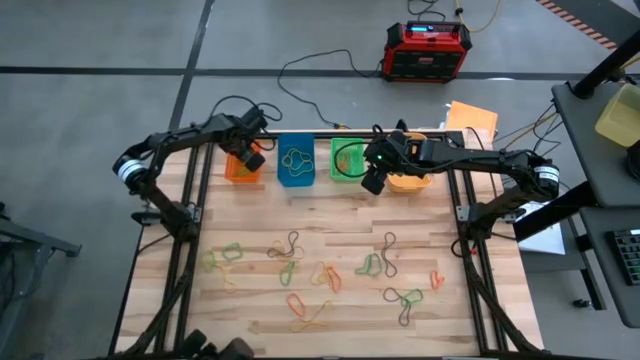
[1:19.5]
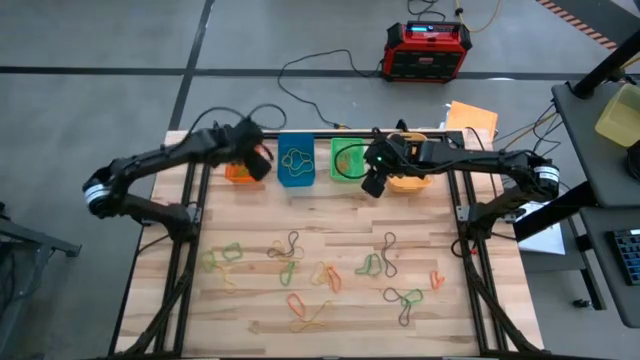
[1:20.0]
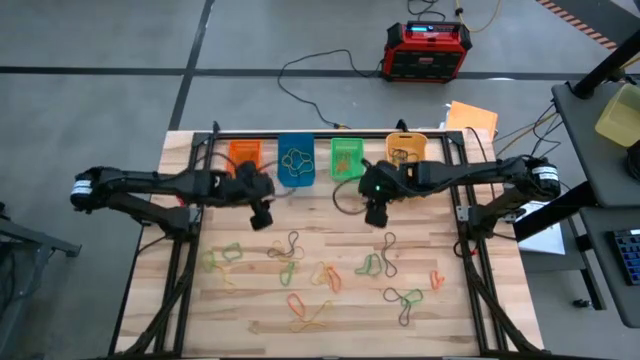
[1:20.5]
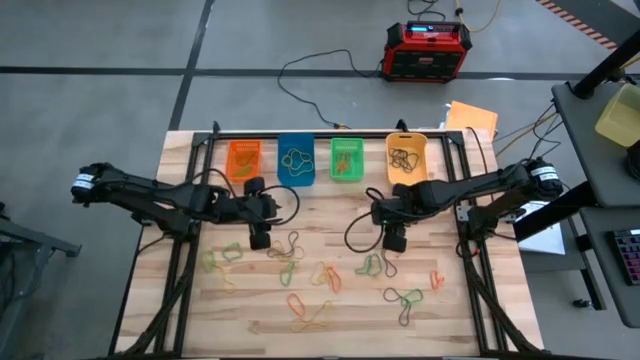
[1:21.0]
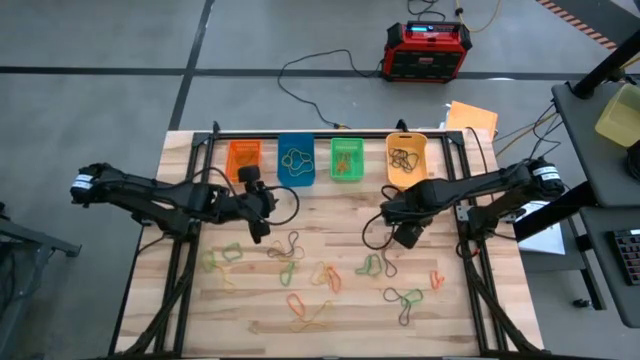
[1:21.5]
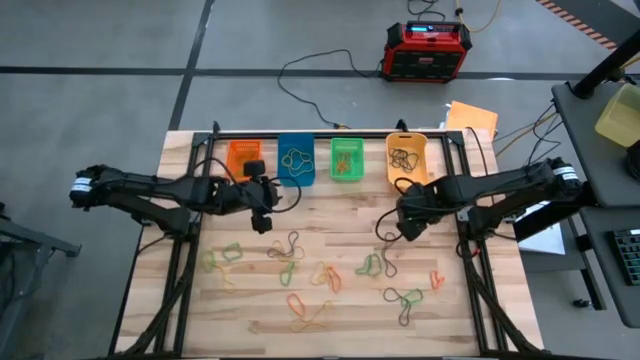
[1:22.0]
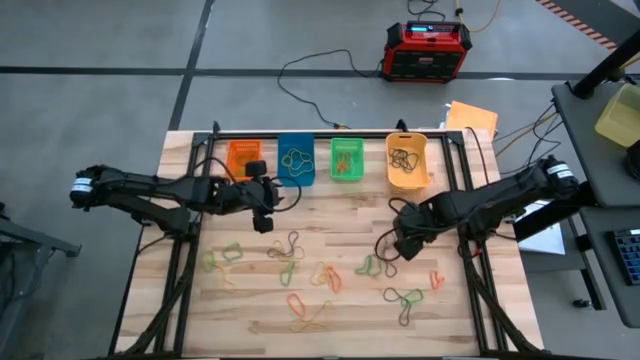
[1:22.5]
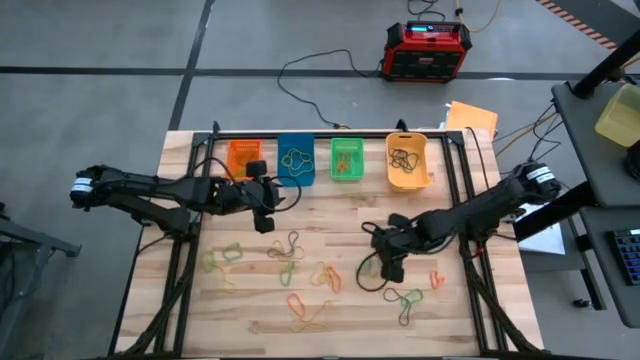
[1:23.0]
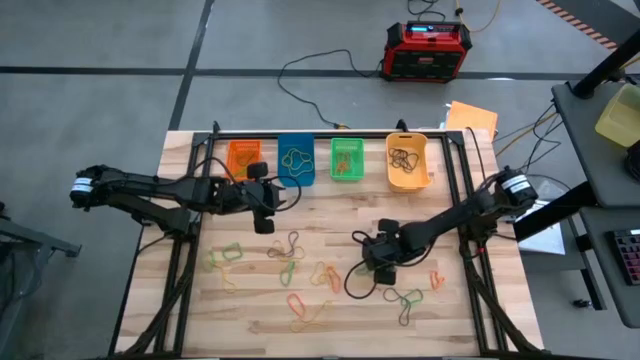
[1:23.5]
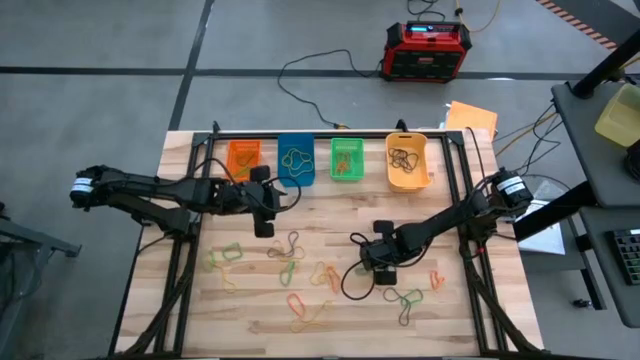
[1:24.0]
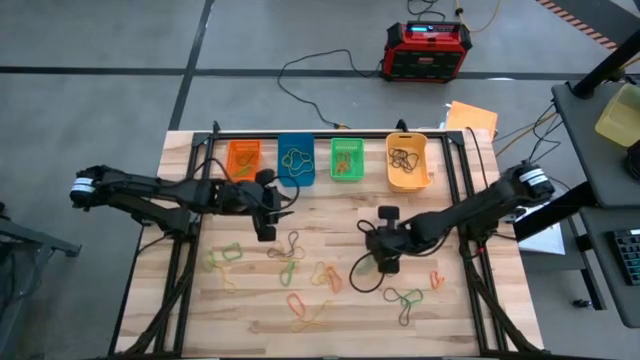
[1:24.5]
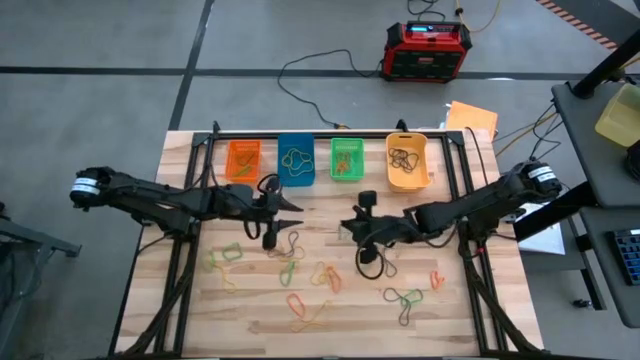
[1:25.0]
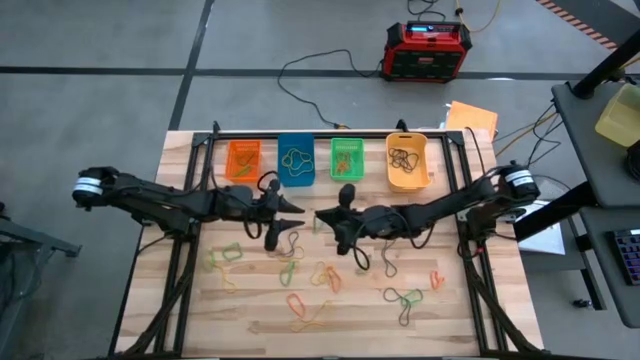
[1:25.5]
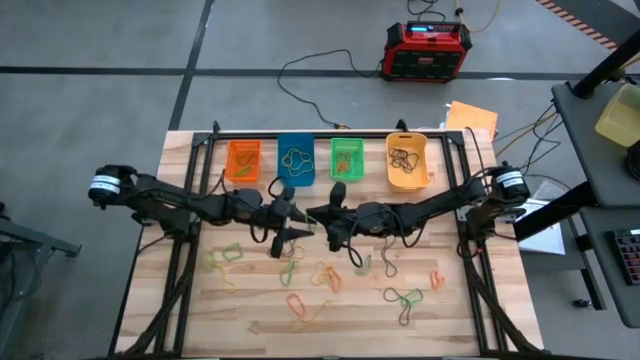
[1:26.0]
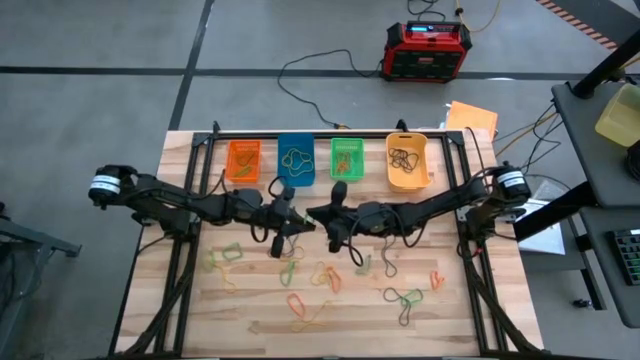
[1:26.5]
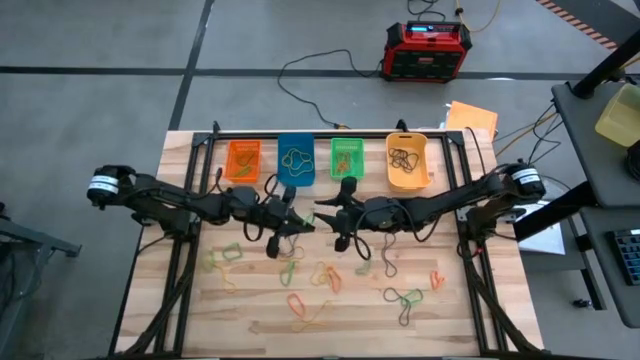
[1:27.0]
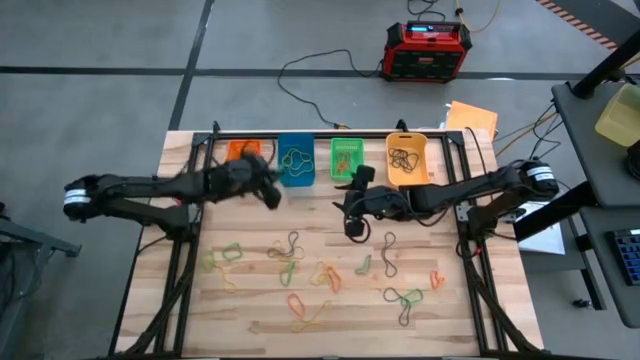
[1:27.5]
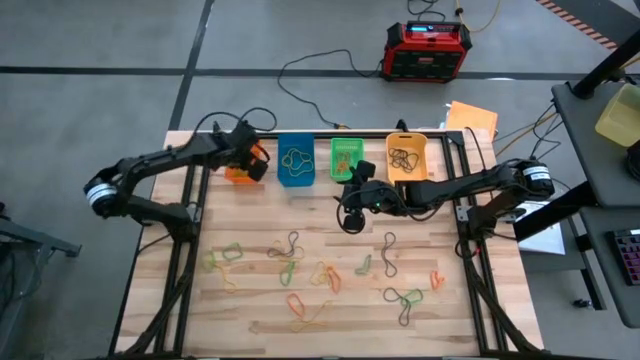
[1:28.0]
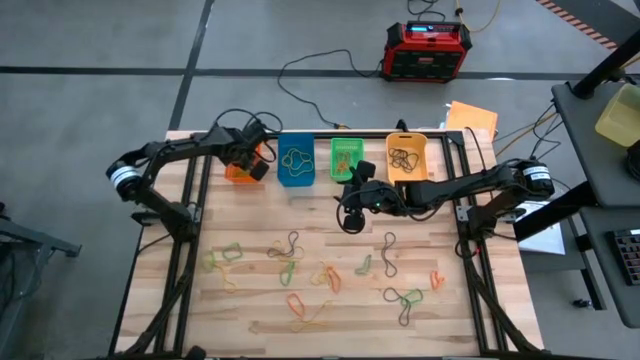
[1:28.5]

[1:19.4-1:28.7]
Task: Sort rubber bands into baskets
Put the green rubber band into the orange bin

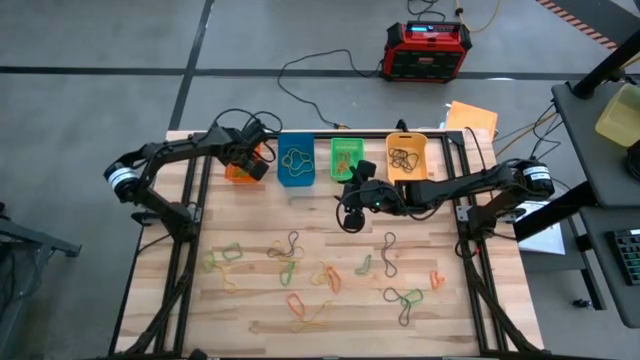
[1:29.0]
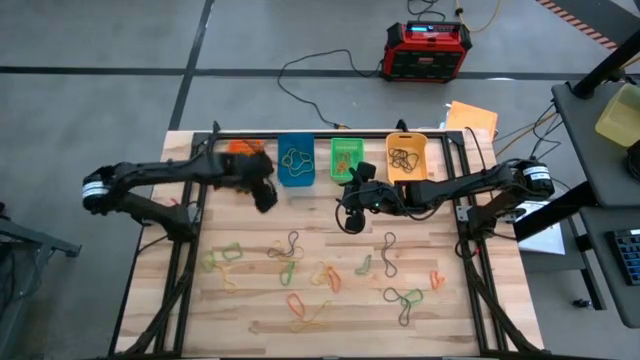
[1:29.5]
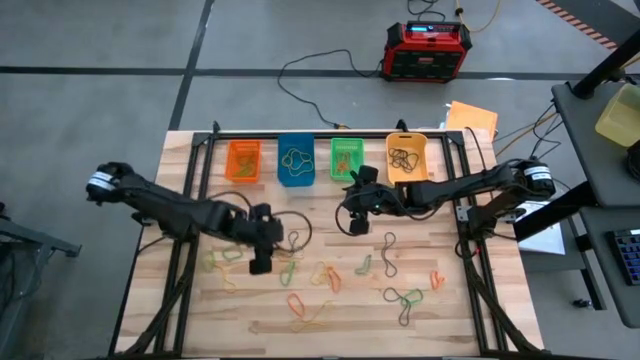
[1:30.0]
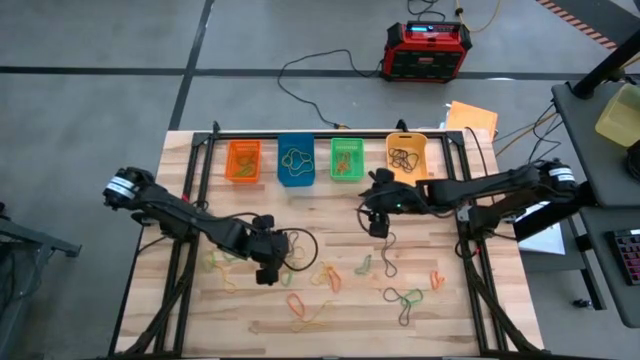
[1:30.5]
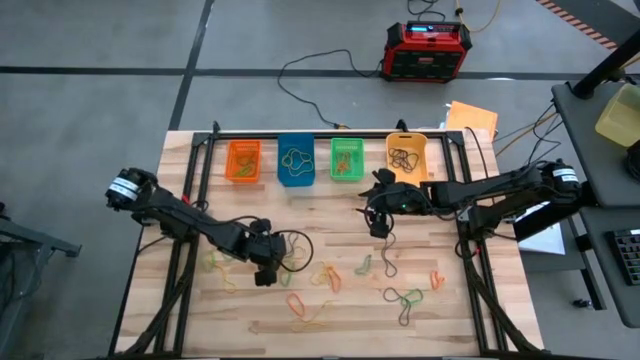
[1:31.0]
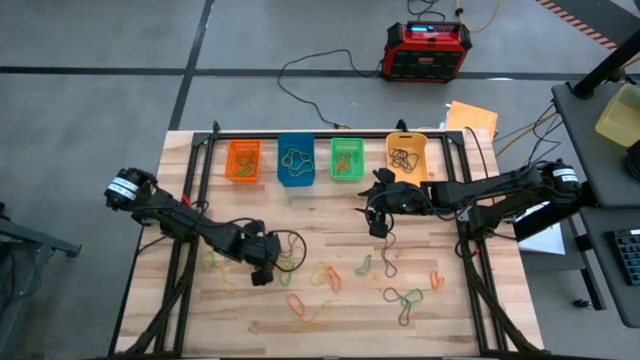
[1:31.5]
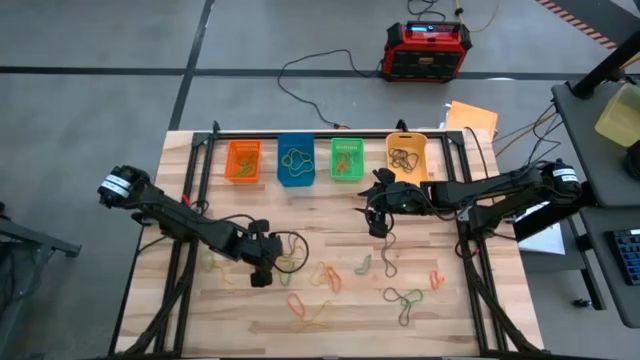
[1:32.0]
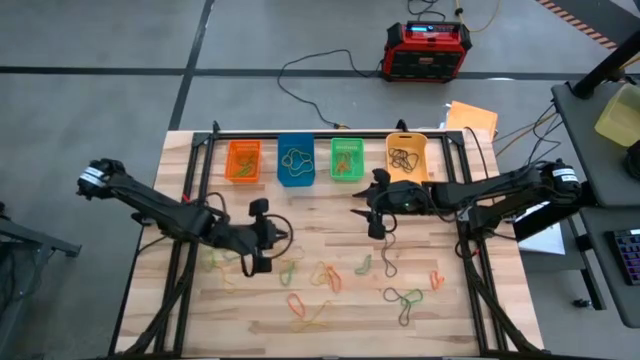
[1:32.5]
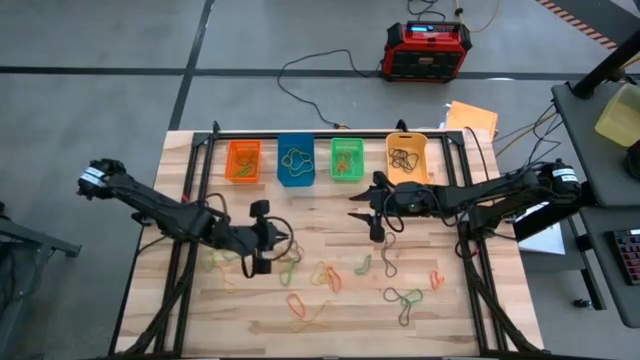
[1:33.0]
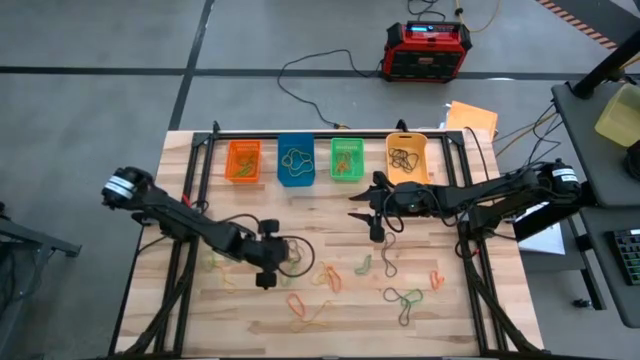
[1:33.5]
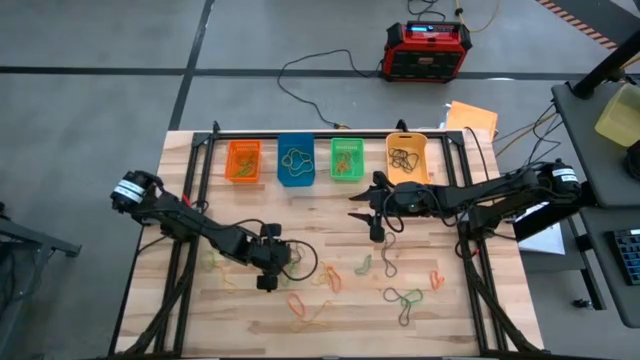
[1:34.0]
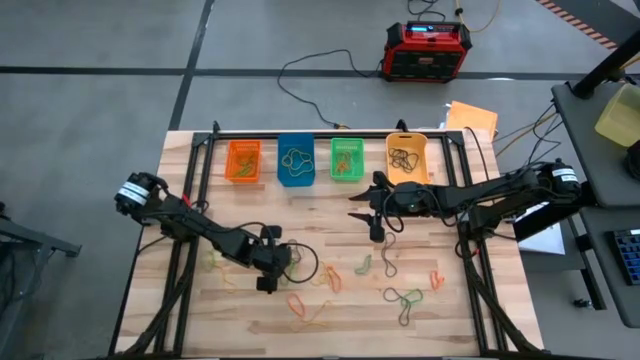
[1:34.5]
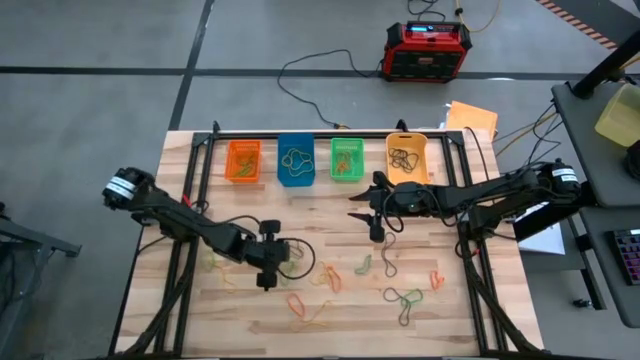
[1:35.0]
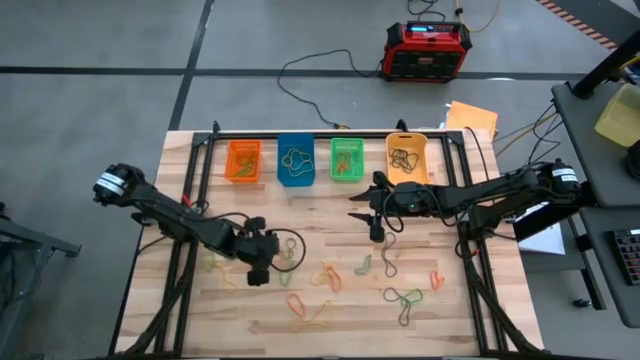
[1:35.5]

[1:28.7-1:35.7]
Put the purple rubber band into the light orange bin

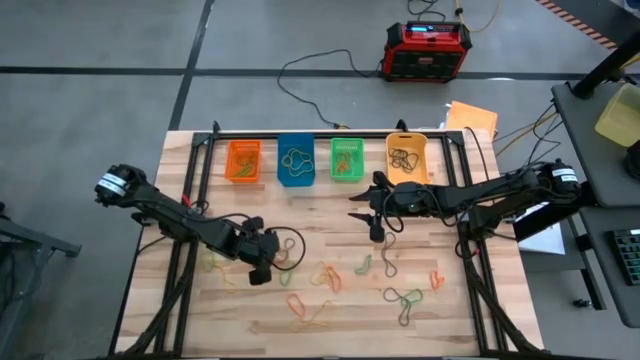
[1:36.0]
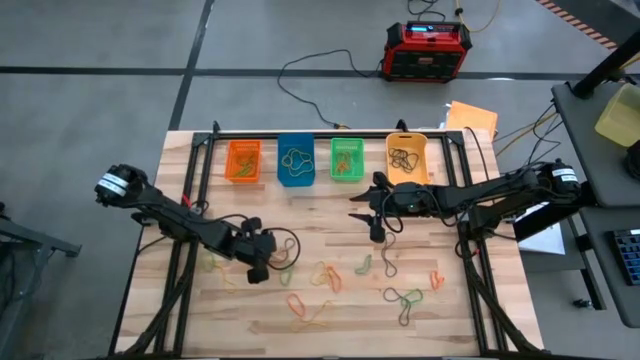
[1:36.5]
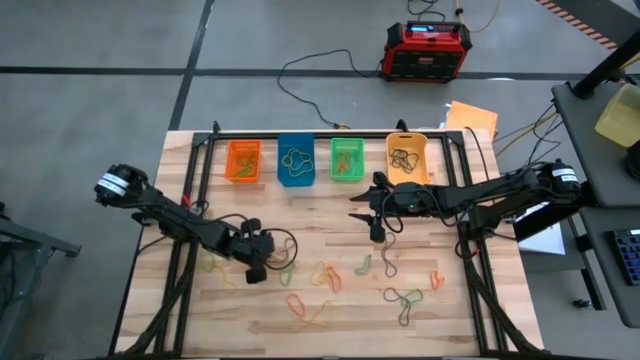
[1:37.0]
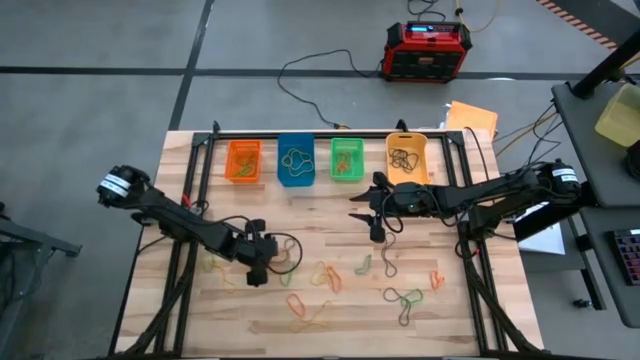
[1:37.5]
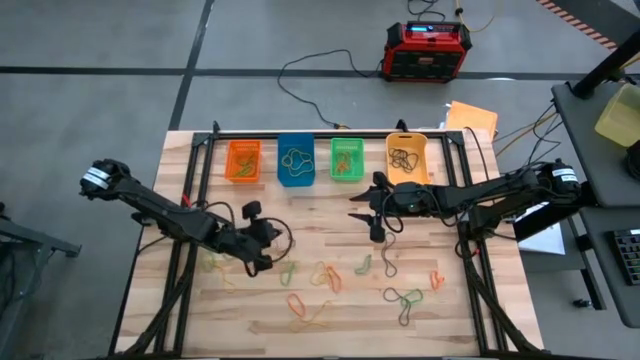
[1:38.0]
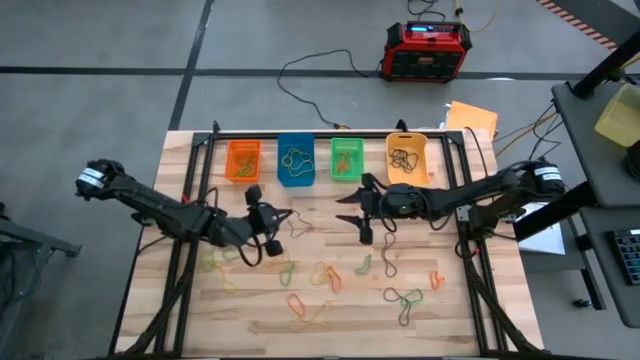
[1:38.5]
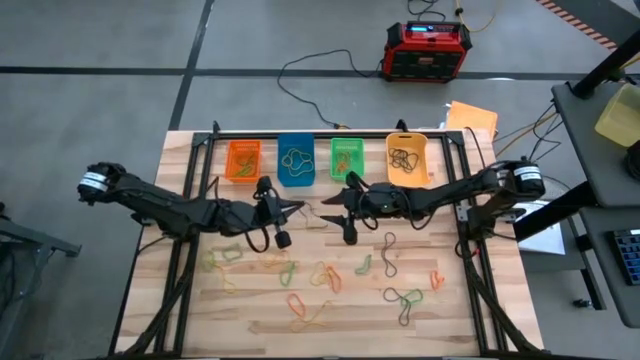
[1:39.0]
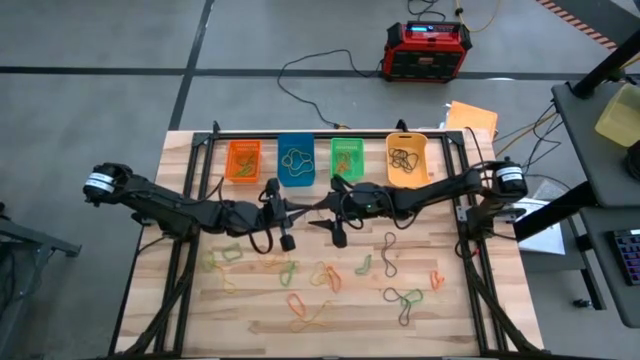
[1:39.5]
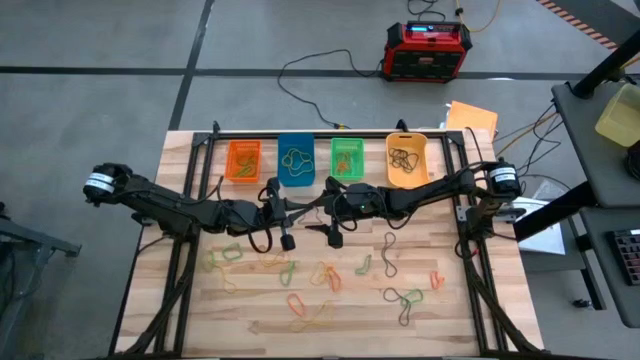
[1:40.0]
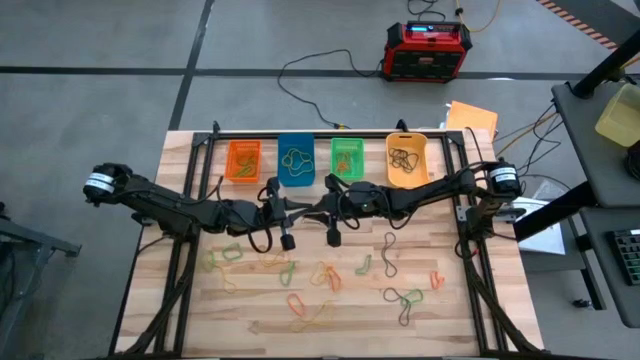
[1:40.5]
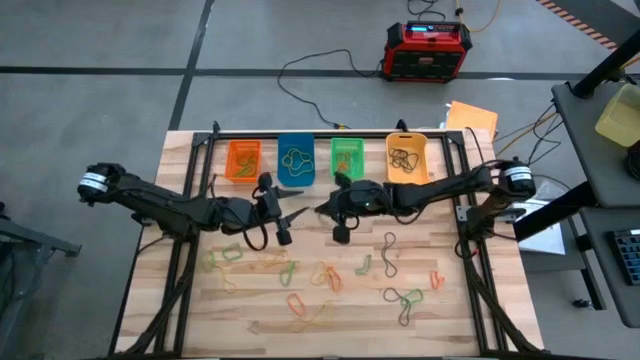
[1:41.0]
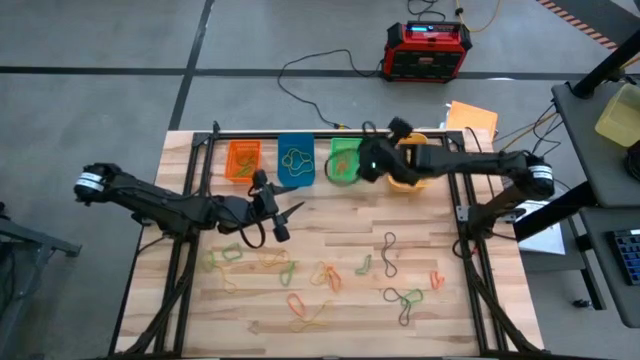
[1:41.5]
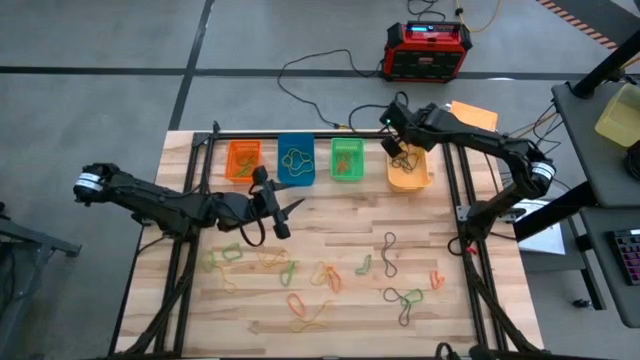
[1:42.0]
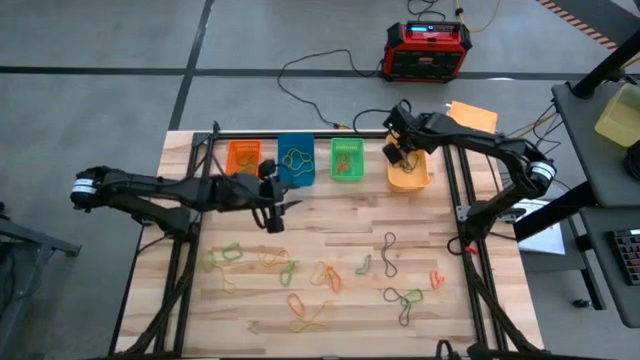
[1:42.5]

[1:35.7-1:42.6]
Put the purple rubber band into the light orange bin
